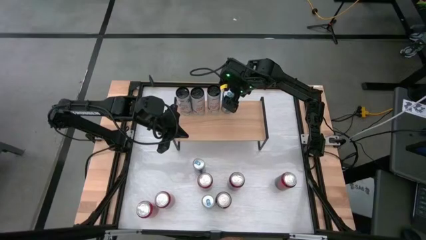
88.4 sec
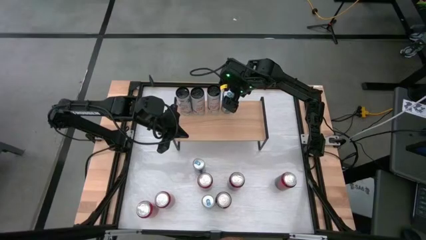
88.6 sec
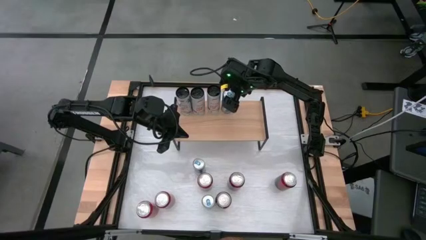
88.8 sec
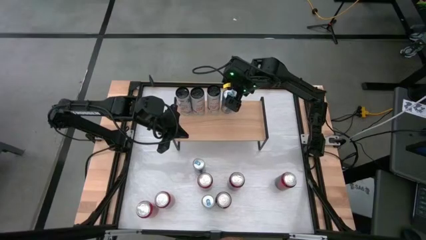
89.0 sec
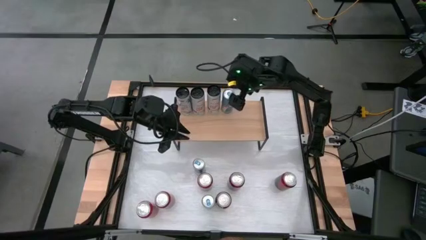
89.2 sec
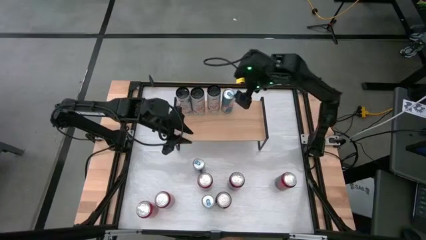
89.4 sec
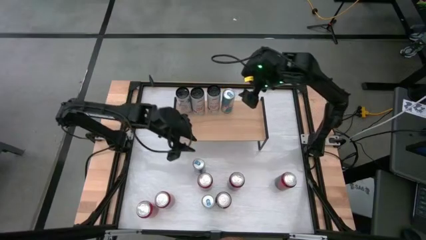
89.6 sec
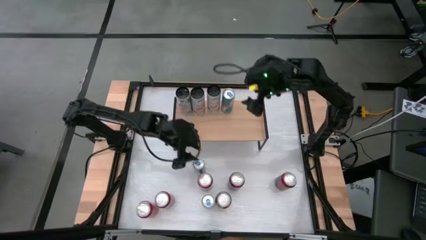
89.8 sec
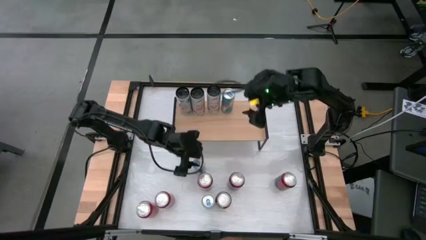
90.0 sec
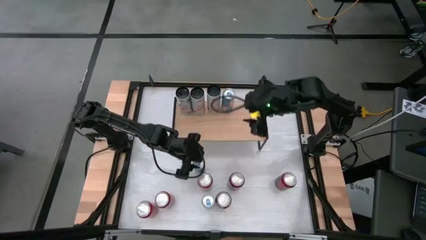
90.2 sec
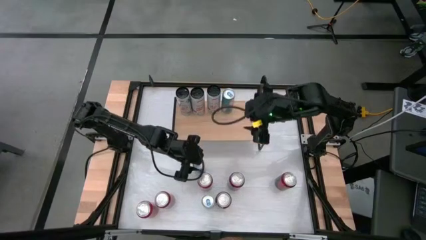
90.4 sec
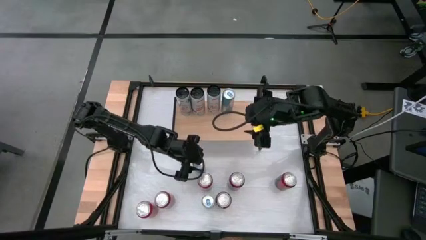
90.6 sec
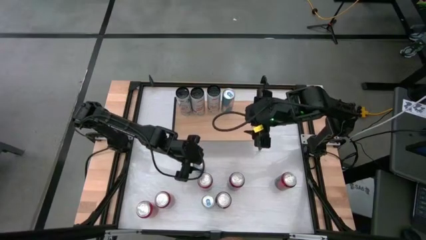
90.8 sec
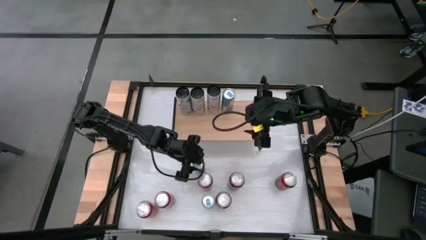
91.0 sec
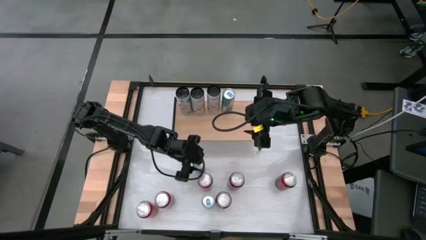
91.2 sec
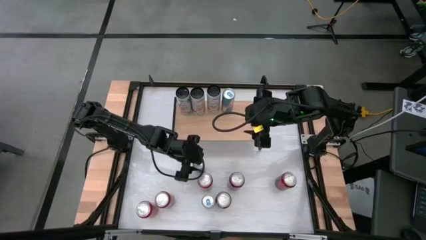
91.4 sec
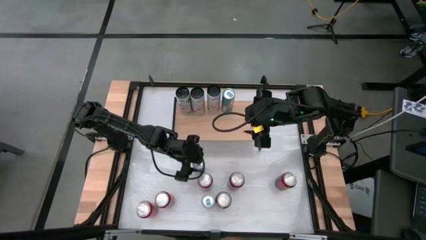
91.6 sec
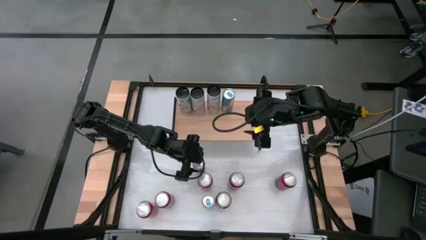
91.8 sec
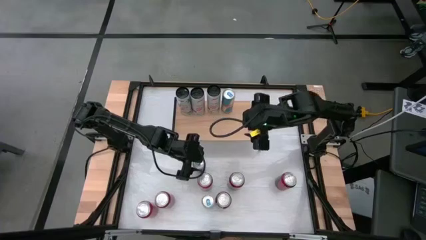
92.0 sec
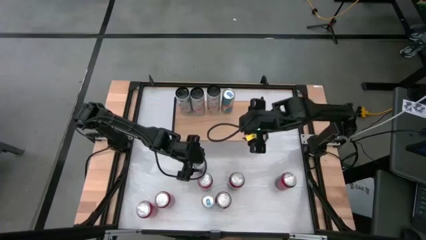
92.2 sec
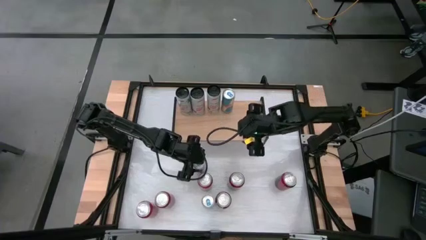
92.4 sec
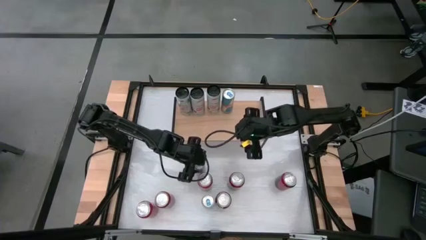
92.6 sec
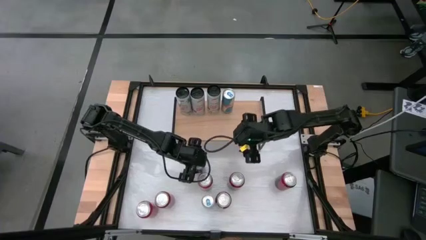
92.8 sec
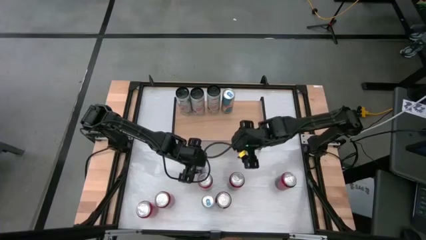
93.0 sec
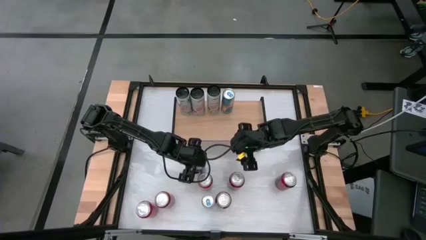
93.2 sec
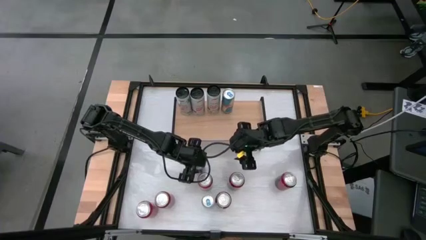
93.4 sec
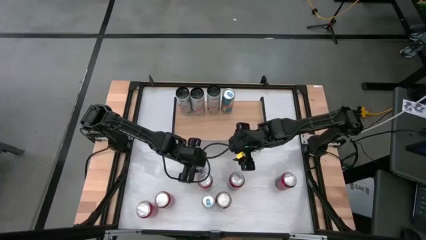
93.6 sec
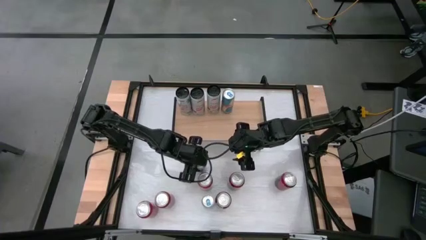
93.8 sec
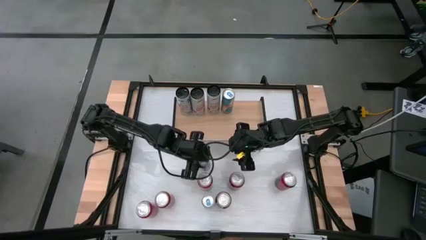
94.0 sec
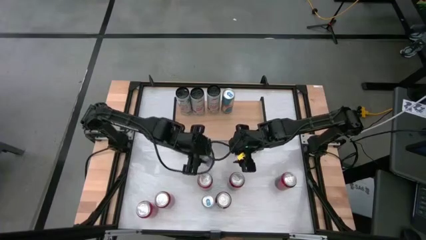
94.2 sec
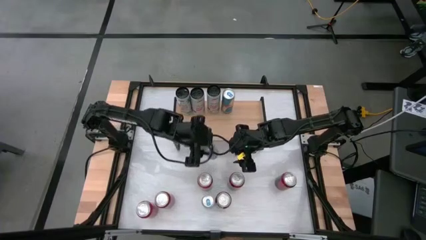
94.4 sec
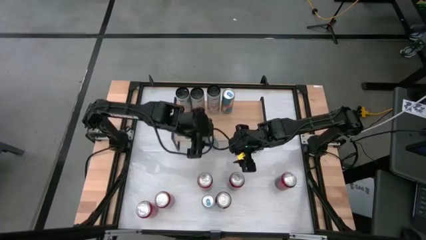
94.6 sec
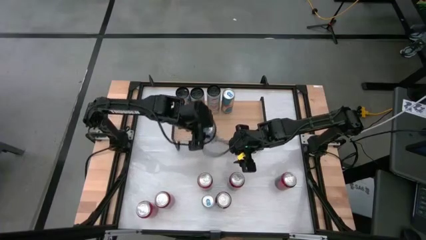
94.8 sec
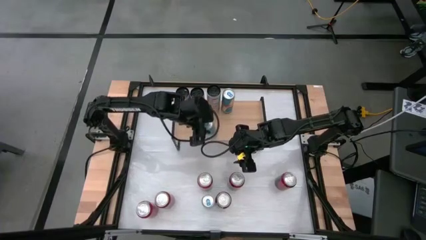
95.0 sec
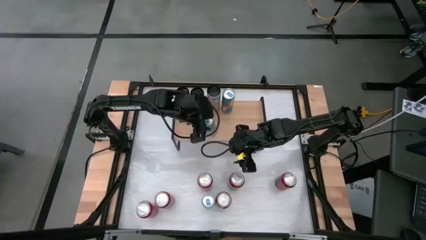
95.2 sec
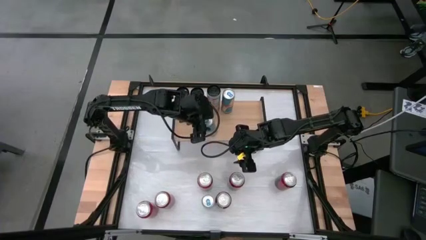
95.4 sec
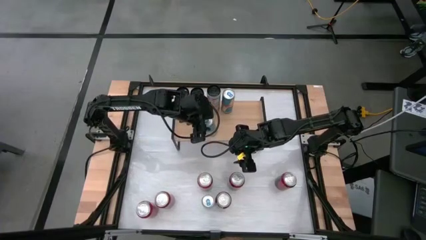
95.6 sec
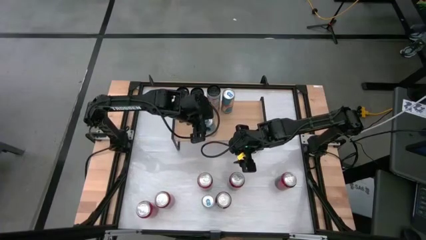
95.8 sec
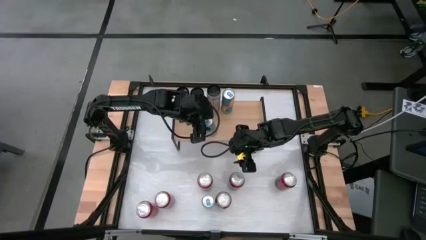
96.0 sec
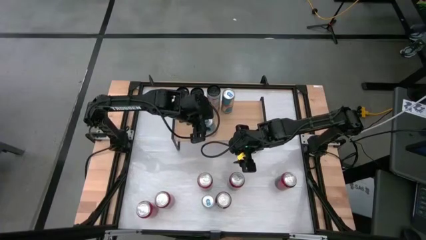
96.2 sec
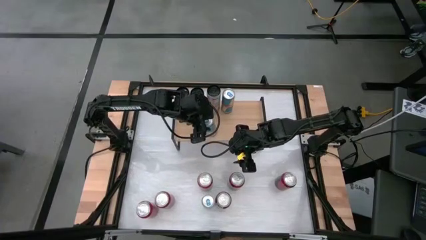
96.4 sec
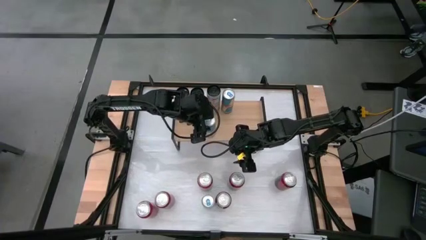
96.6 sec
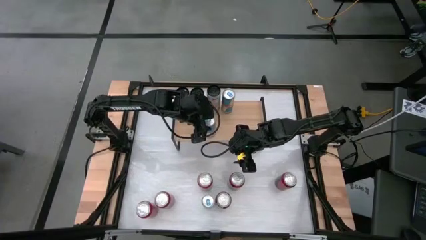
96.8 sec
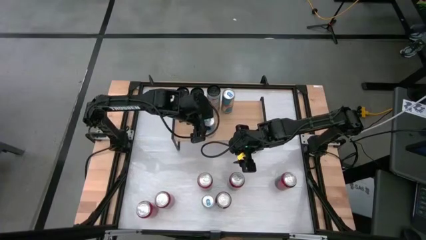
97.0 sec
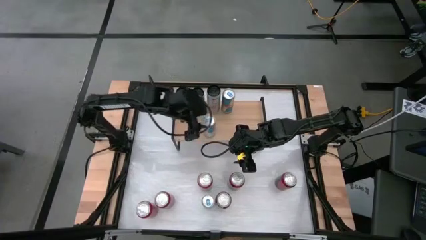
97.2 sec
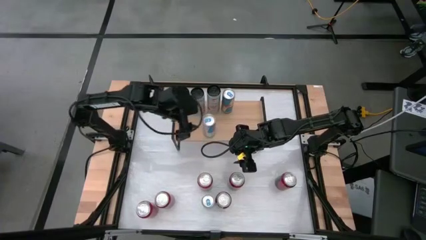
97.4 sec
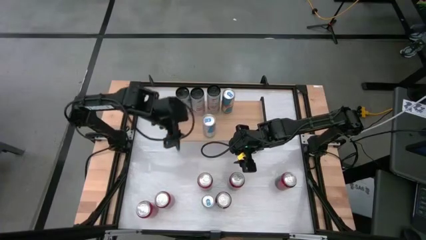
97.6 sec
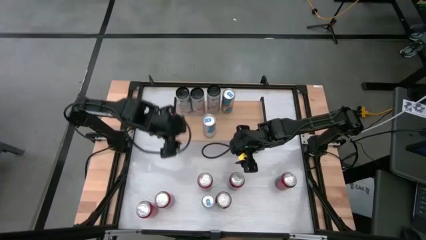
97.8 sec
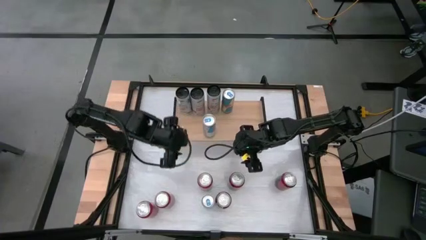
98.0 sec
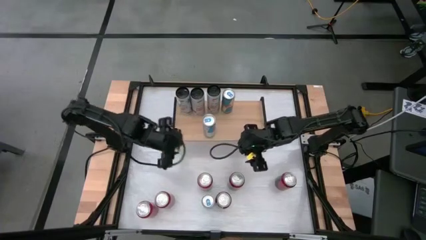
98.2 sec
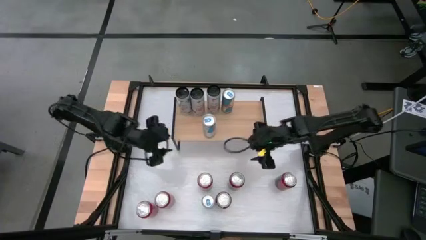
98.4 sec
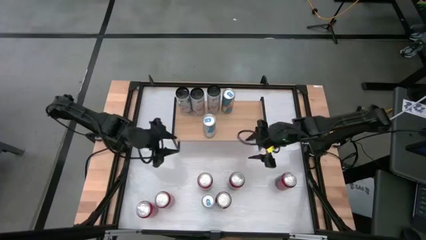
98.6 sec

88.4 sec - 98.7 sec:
Task: Place canned beverage on shelf
Put the top blue soda can on the shelf

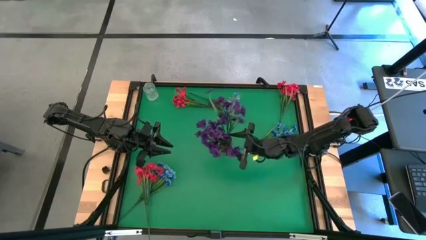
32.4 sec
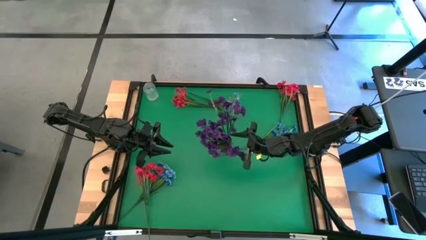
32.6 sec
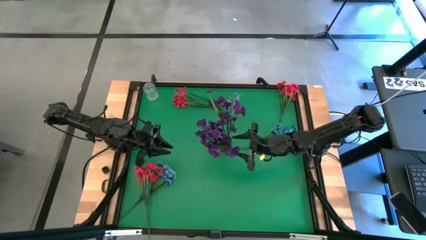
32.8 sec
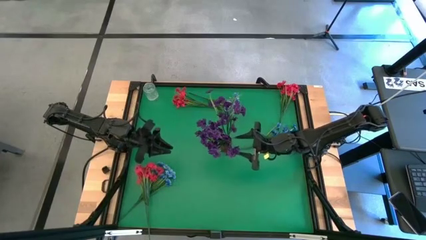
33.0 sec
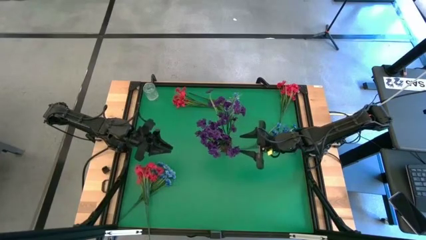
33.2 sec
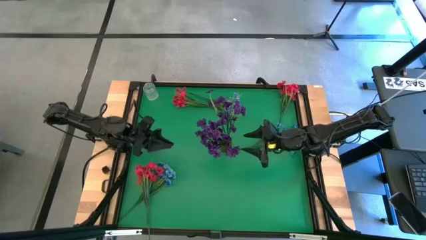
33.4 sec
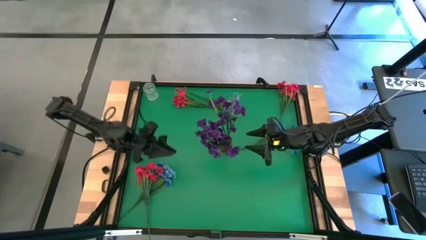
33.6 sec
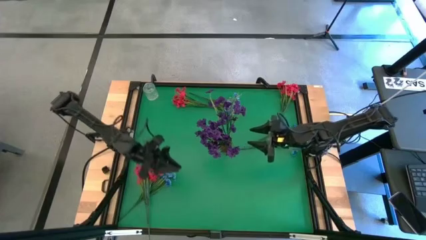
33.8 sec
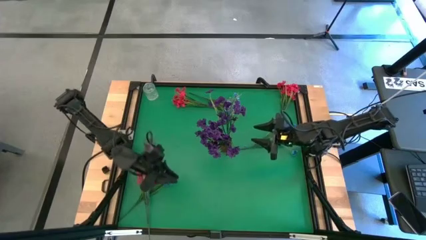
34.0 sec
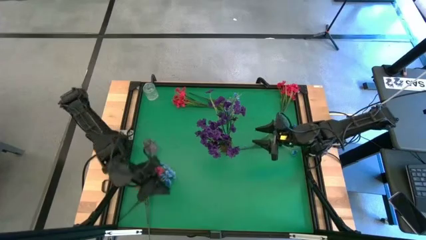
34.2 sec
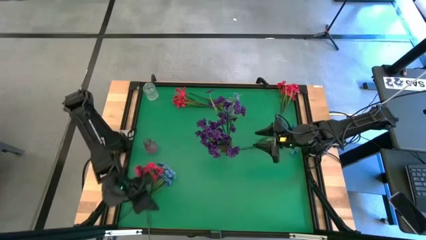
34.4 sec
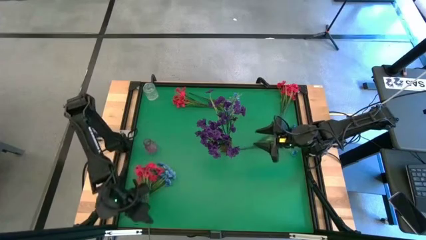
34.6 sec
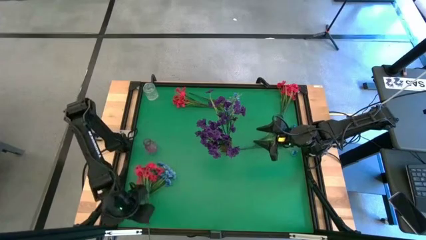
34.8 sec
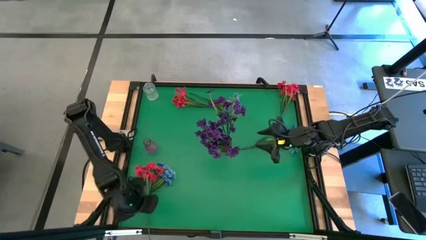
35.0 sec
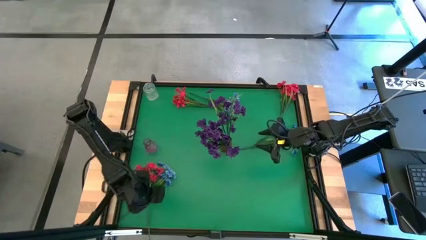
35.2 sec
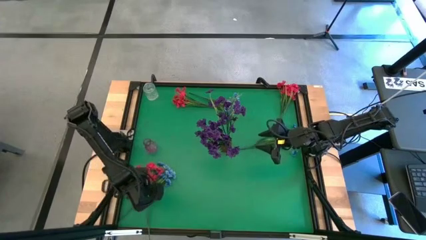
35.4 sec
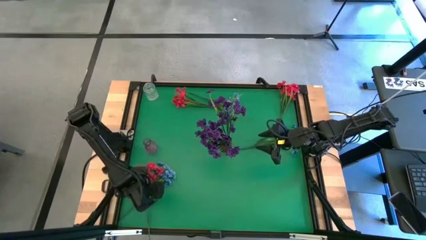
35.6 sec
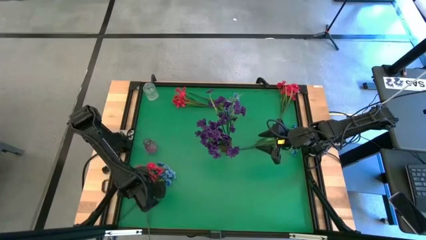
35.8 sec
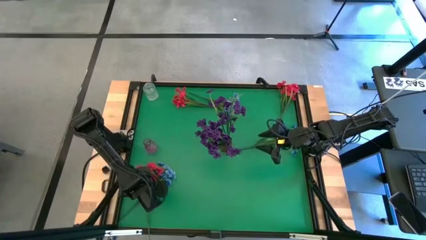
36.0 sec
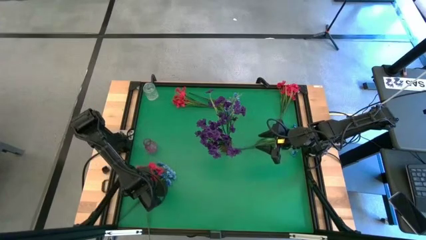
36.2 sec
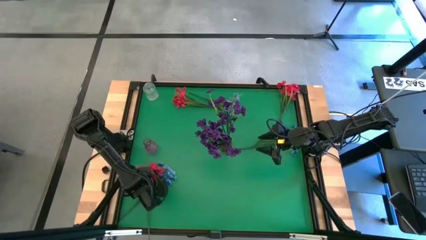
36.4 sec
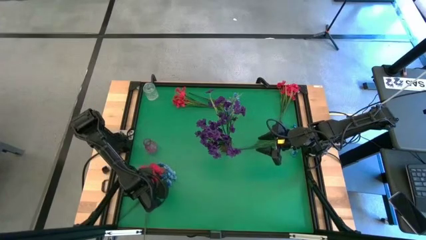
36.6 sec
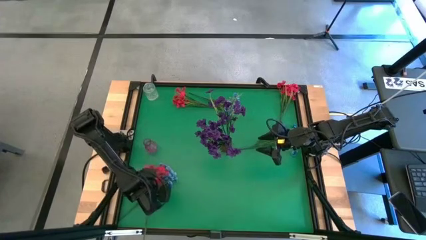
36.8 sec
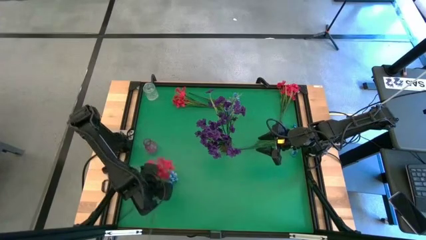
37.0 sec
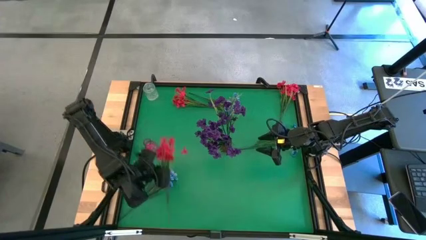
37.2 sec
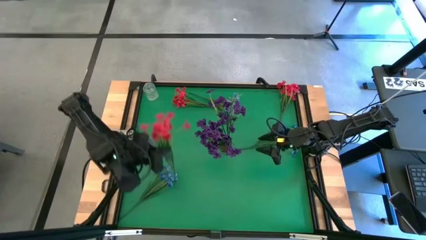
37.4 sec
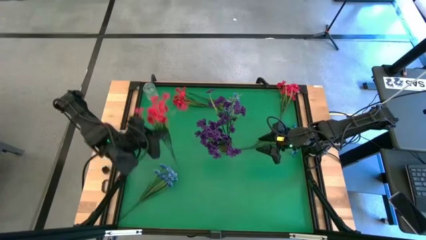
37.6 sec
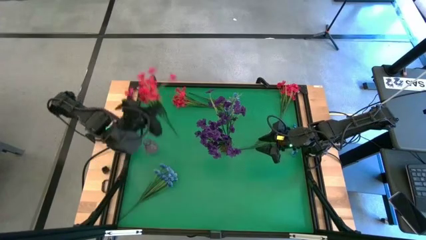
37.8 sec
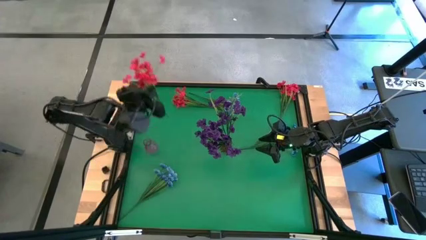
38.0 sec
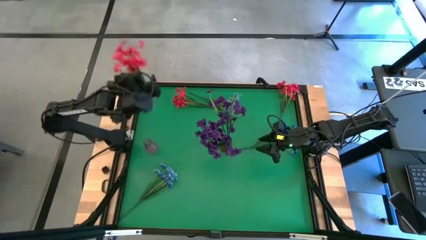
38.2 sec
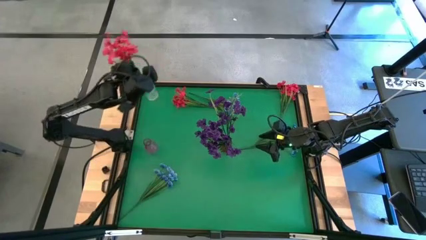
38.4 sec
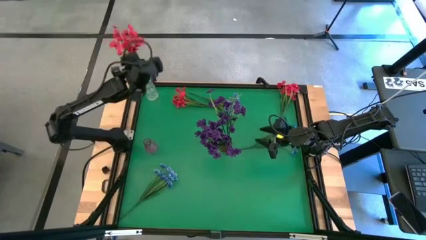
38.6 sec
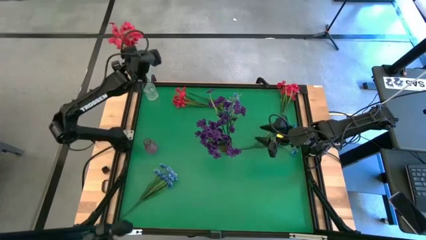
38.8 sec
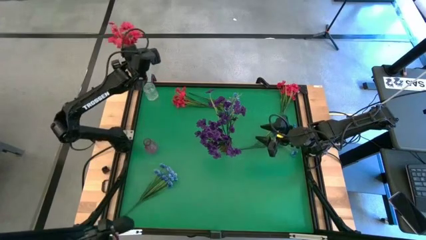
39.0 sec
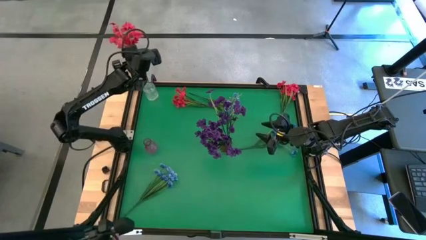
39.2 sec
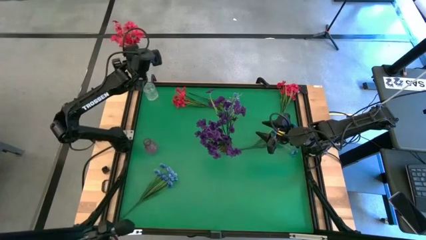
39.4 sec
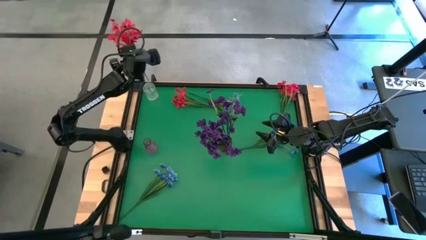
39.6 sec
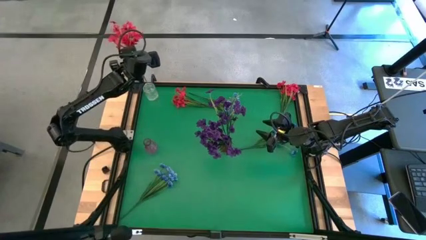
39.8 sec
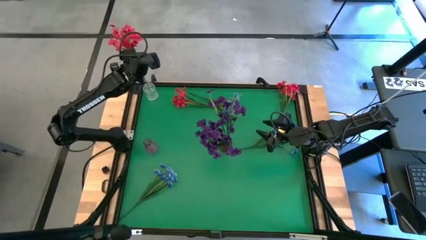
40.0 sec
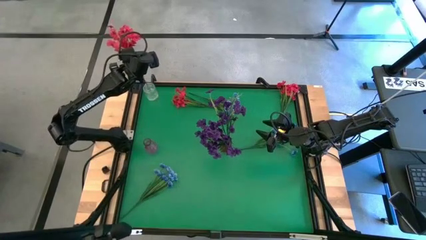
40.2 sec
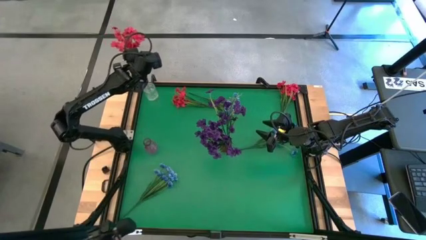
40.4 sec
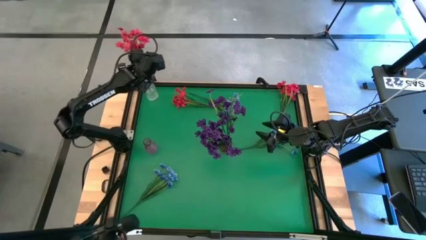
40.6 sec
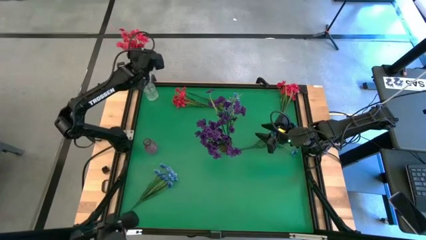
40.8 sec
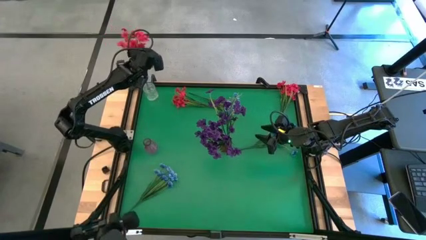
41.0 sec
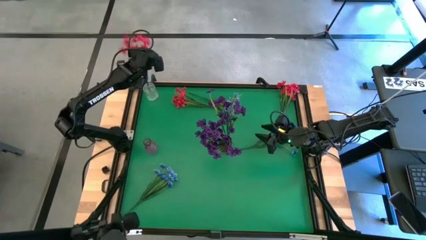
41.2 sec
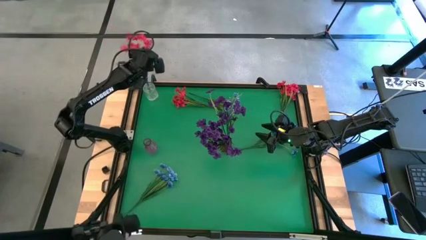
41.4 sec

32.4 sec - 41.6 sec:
Task: Sort flowers into vase by color
Put the left red flowers into the transparent vase
